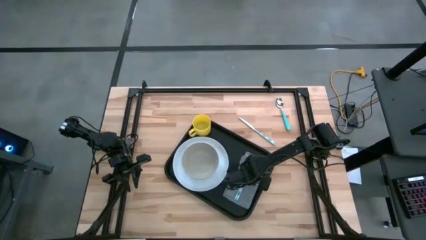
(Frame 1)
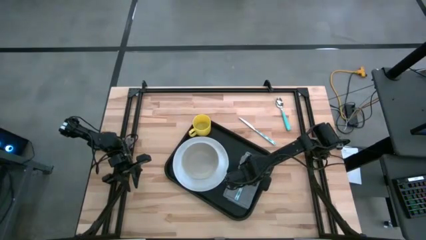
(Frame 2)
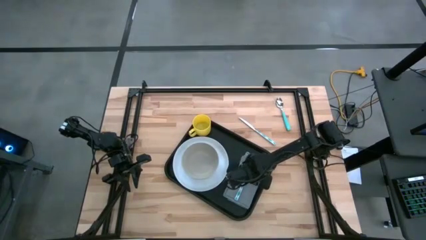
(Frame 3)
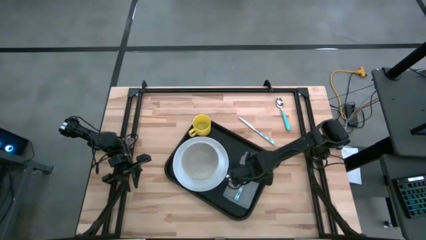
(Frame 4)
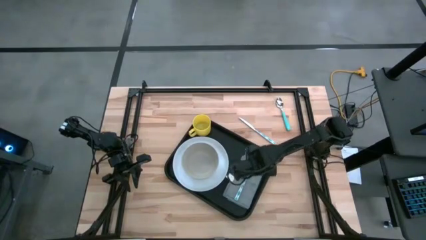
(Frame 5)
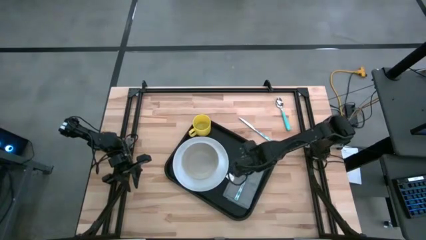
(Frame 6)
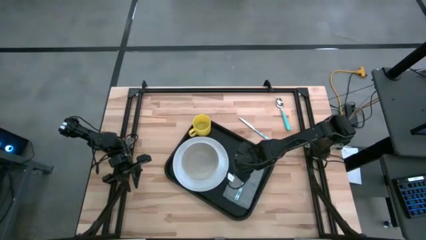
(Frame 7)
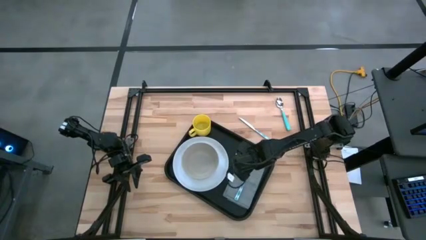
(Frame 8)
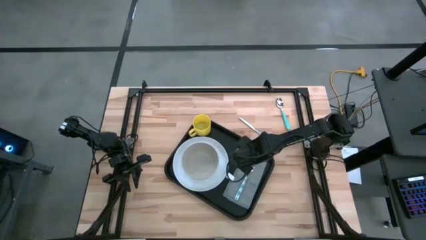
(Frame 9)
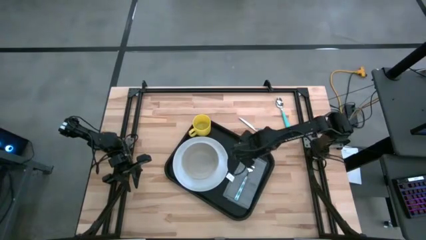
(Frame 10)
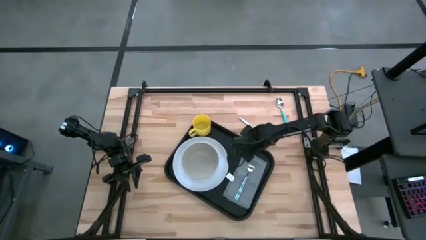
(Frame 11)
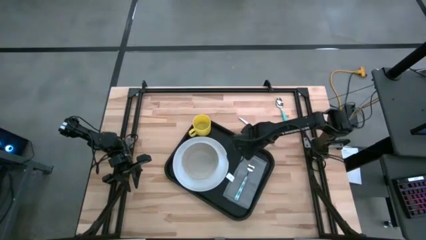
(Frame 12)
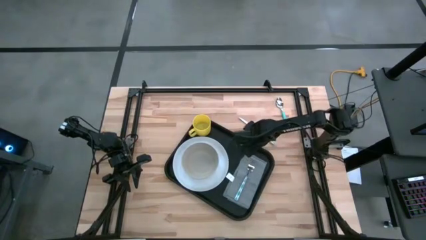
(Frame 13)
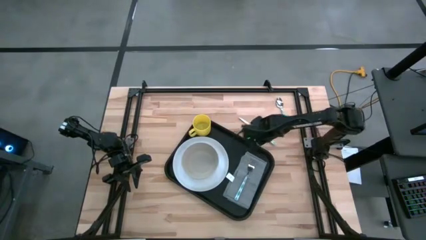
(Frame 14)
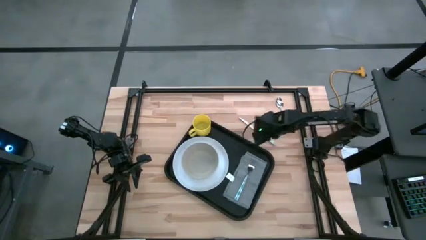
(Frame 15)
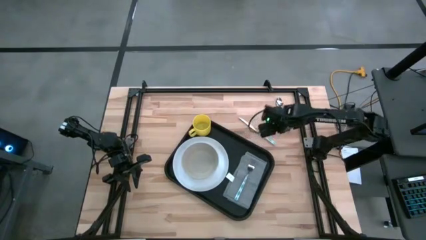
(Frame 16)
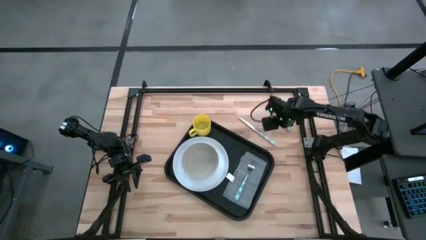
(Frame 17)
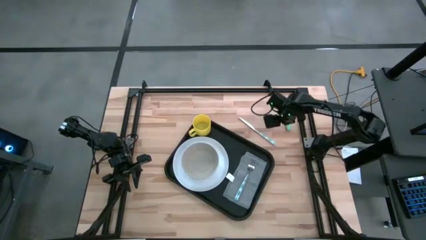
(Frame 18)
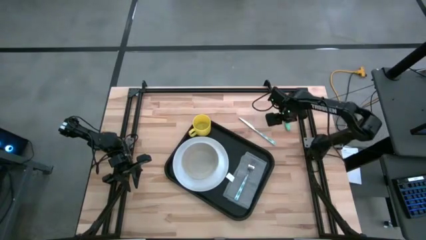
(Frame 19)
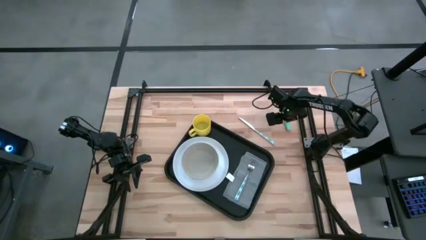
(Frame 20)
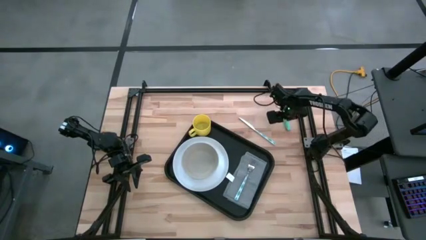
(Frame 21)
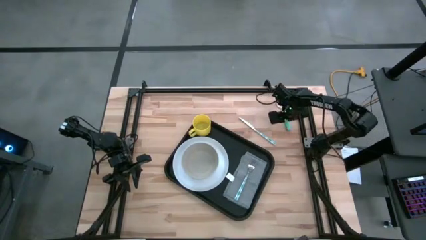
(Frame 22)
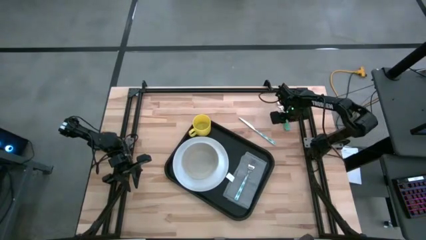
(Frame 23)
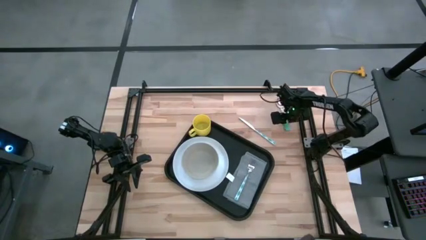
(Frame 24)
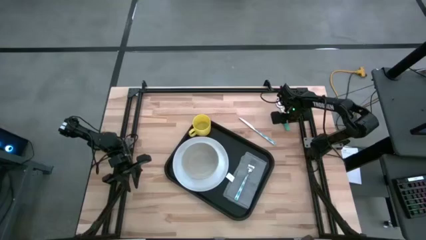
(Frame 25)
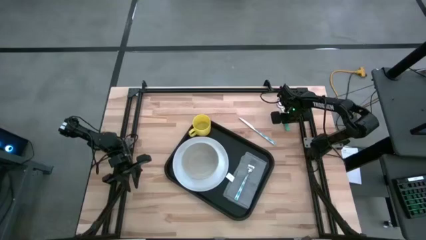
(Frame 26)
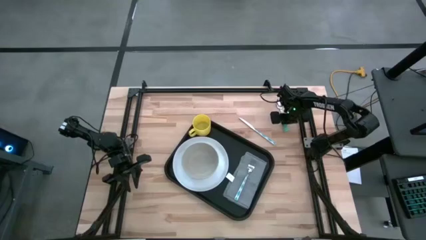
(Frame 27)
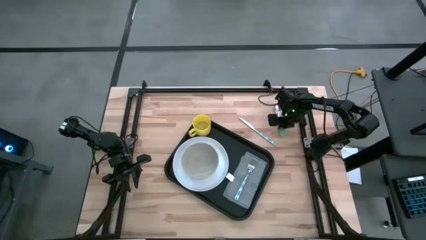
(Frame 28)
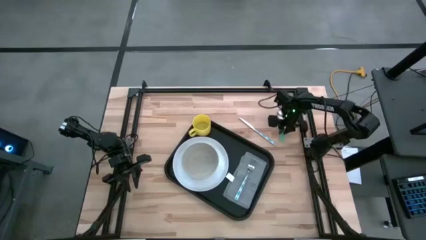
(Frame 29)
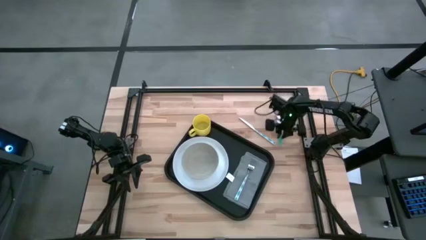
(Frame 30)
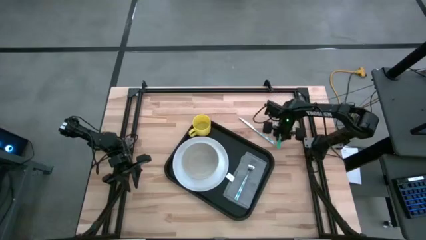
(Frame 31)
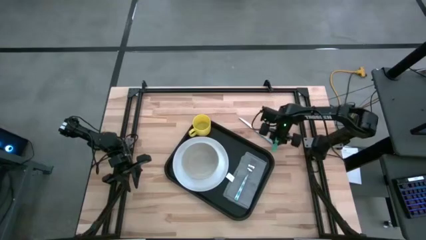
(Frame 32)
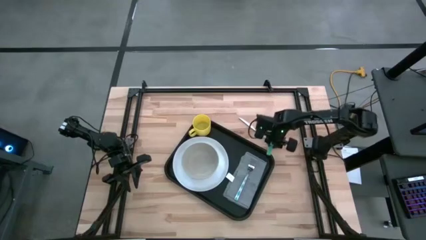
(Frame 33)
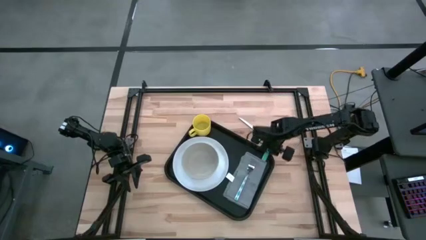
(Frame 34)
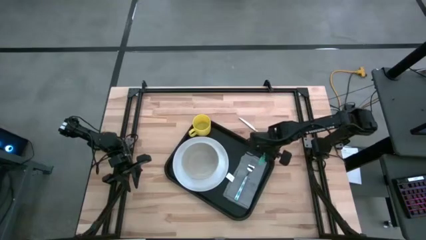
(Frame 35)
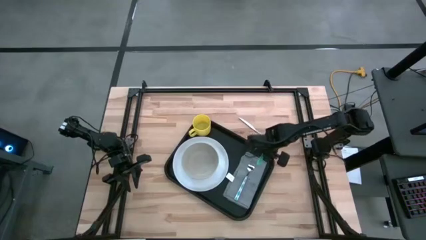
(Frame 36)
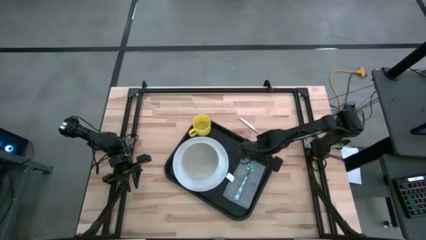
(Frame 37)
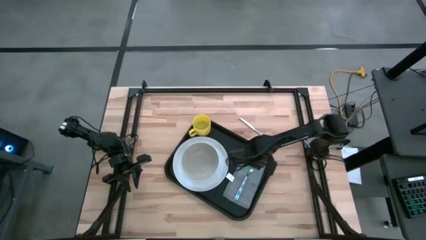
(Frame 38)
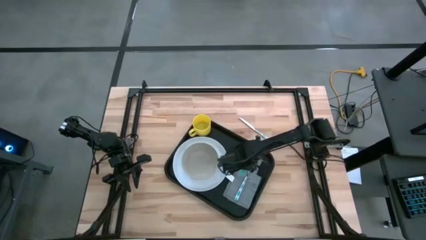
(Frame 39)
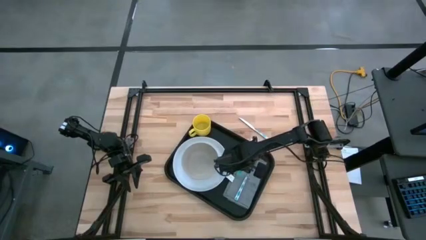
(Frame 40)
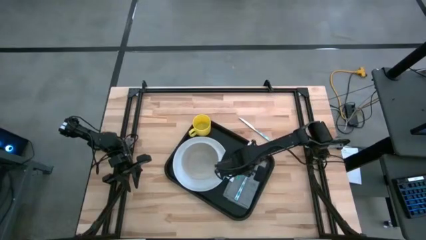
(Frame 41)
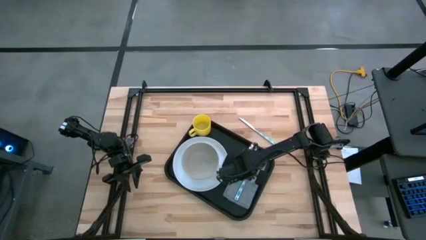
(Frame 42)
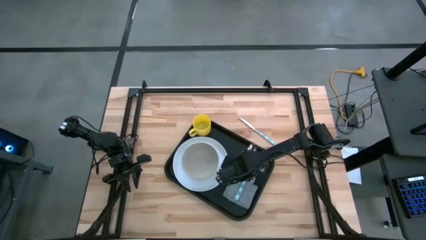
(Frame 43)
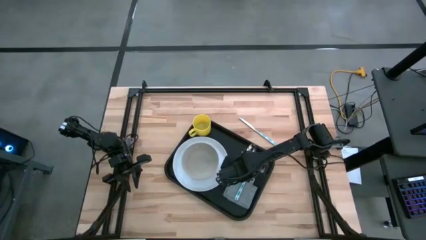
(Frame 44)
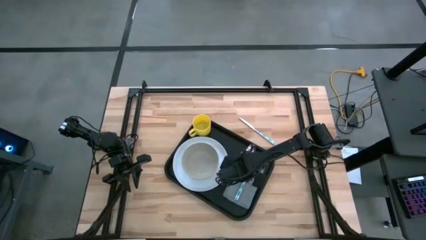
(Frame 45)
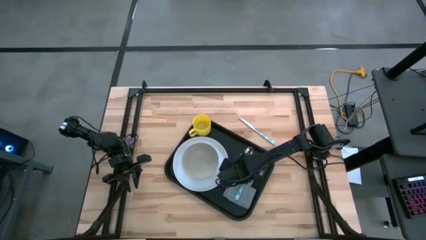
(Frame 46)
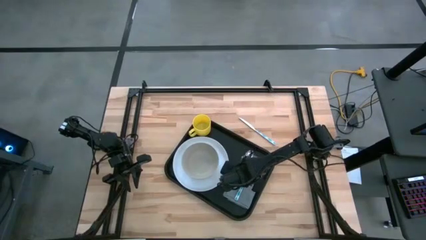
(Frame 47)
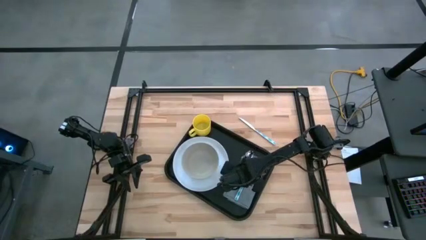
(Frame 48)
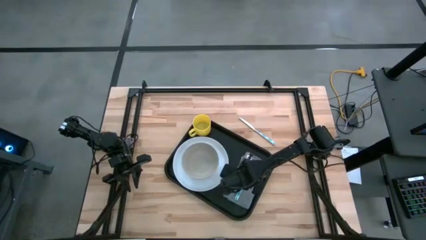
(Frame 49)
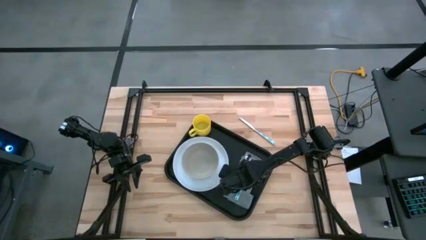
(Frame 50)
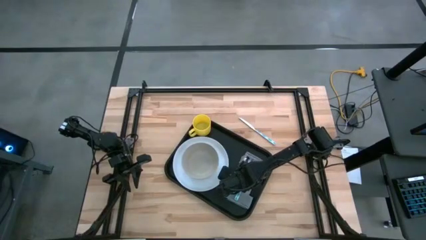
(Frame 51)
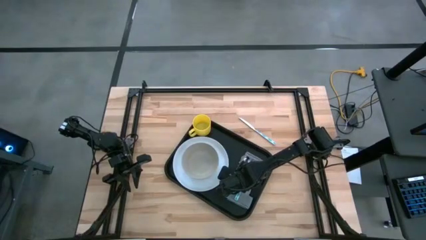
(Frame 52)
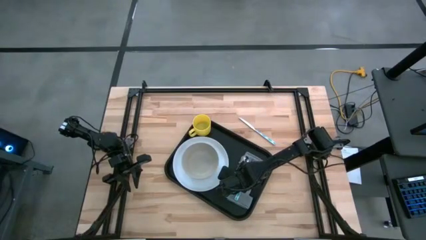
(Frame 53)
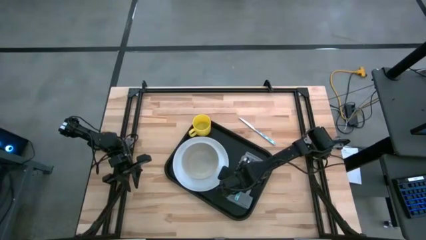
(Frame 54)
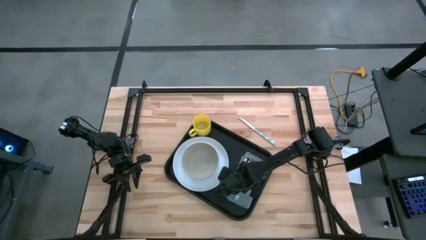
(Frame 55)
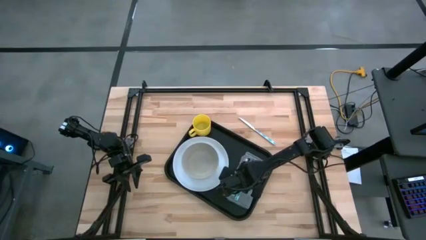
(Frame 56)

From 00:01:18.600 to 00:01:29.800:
Task: Set up tray
Put the blue spoon on the gray napkin to the right of the white plate

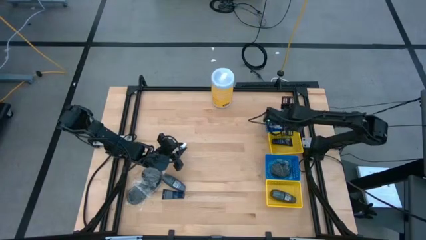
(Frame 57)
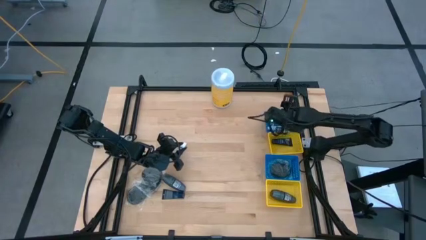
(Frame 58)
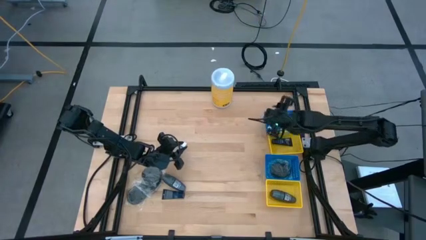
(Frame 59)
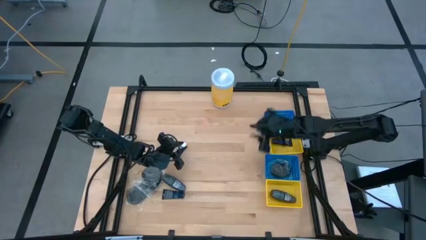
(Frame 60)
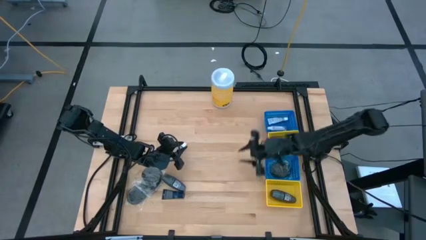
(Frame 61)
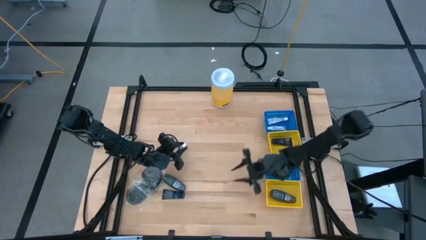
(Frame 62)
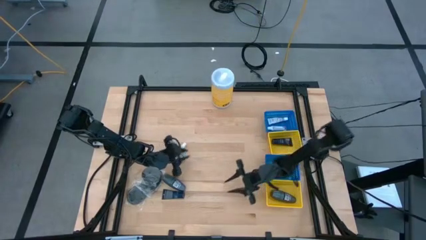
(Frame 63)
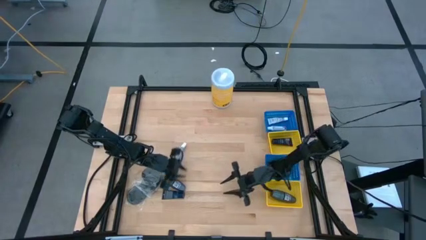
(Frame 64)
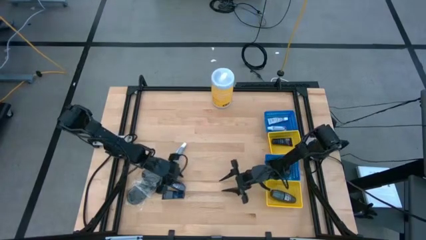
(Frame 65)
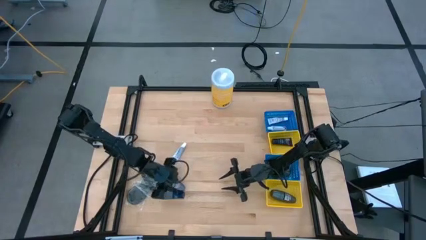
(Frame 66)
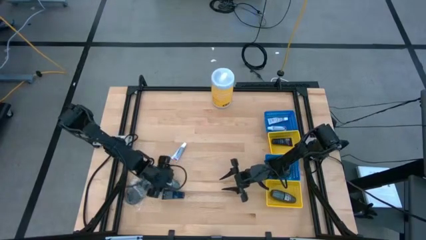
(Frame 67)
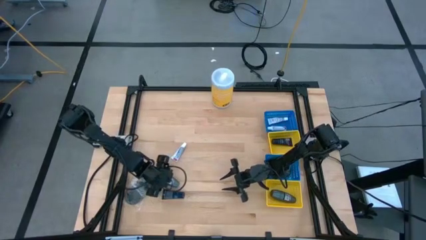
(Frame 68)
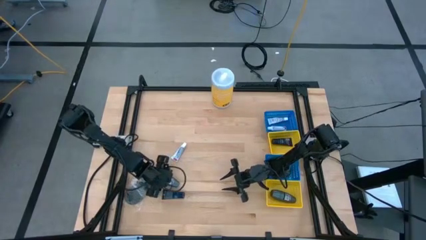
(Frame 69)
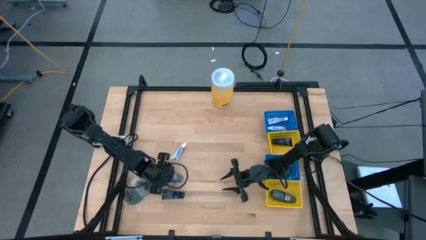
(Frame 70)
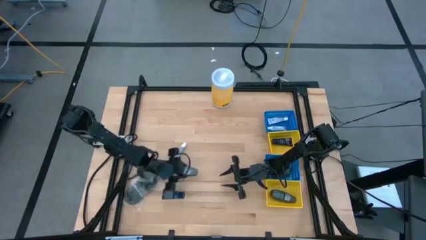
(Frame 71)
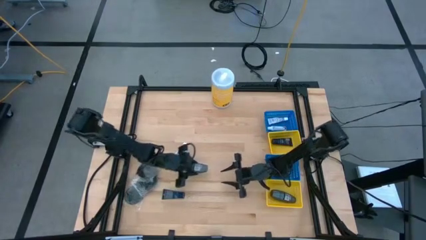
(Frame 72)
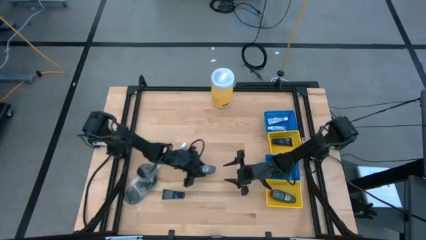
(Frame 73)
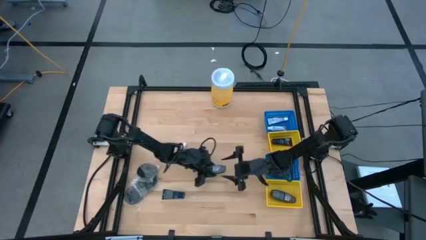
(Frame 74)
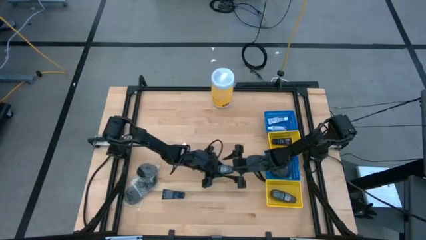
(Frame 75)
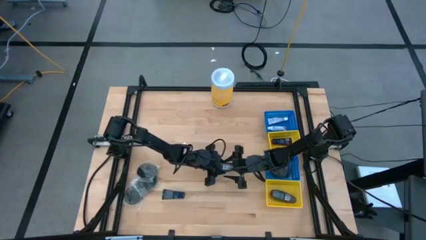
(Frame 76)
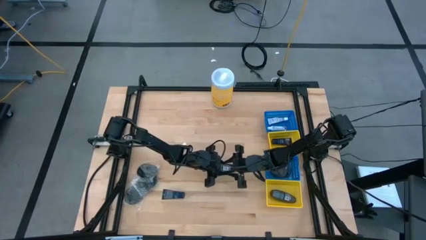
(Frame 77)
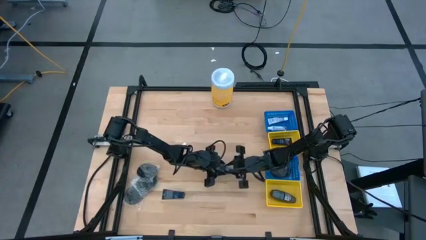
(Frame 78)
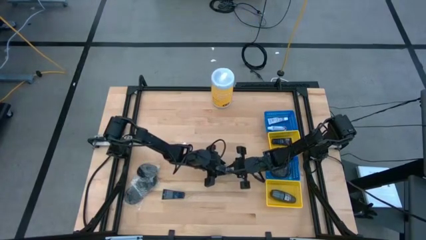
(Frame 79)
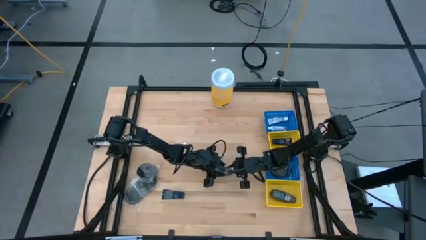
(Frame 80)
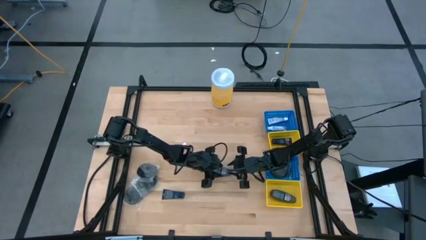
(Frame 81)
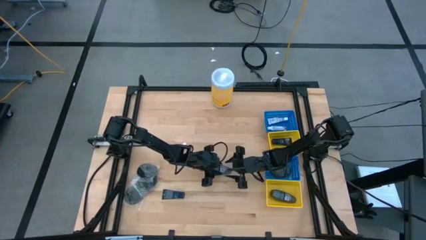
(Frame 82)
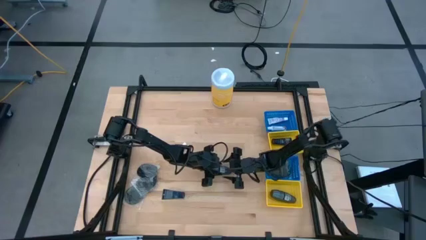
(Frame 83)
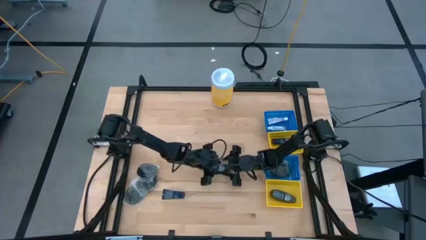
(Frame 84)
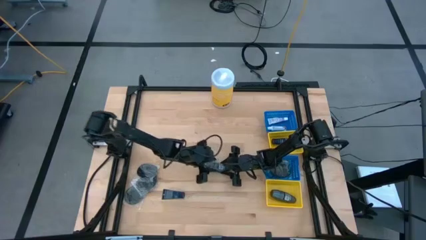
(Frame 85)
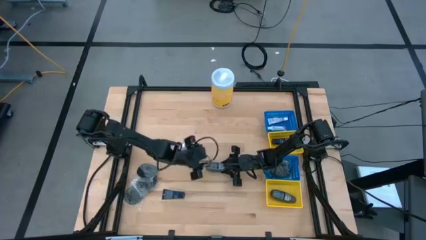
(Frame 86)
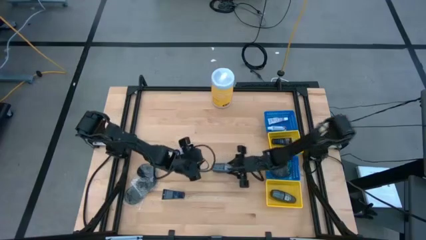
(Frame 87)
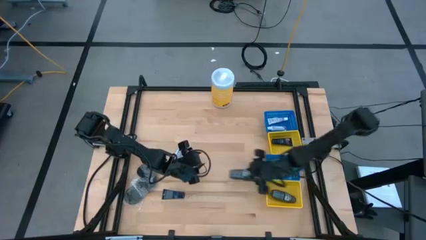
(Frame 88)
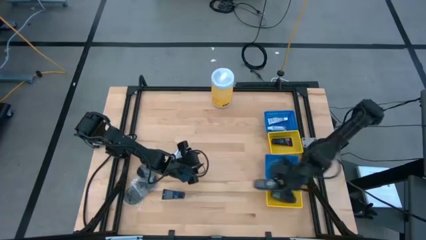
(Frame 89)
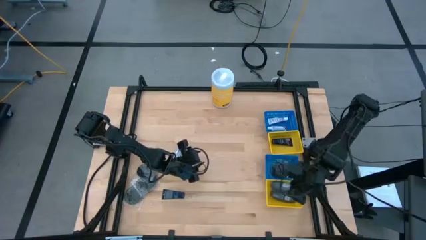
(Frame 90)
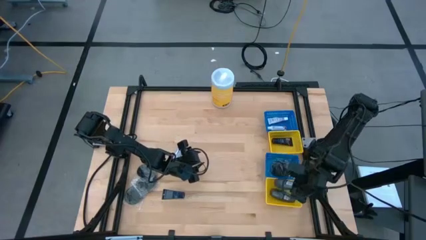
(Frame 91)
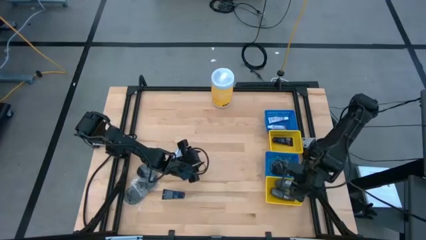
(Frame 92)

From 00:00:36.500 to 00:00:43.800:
Task: Pick & Place Travel size toiletries
Put the gray deodorant into the bottom yellow bin
